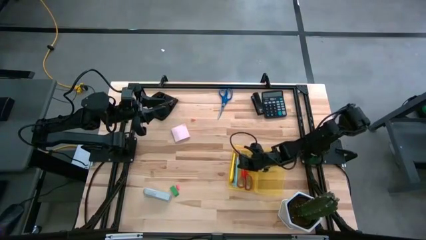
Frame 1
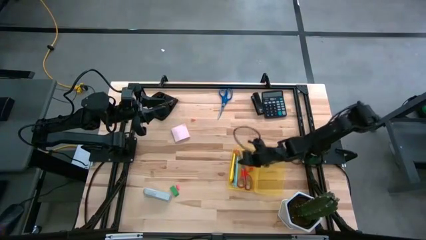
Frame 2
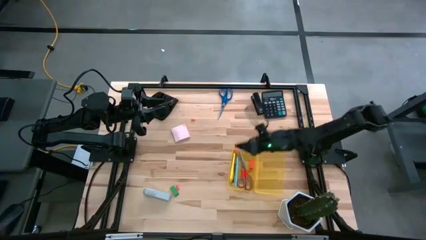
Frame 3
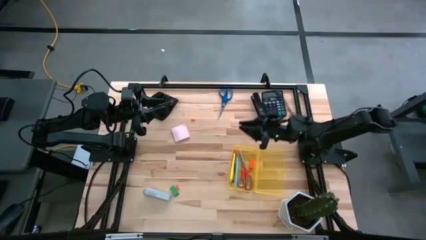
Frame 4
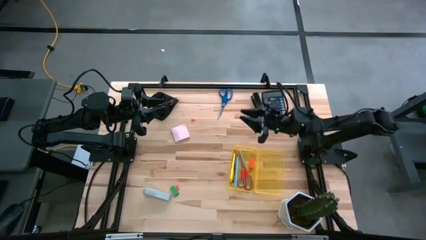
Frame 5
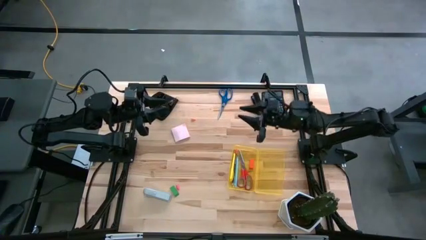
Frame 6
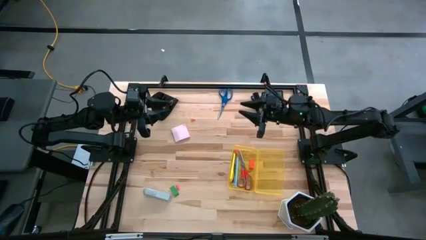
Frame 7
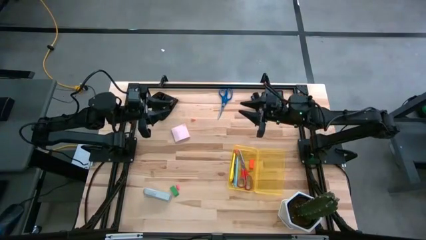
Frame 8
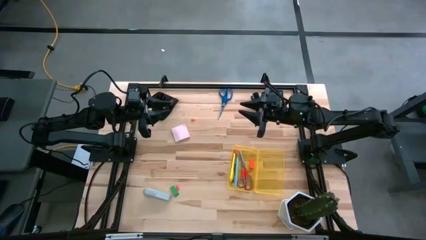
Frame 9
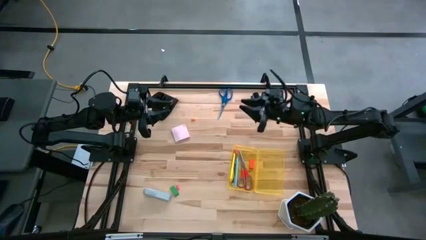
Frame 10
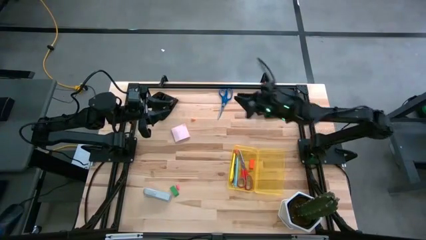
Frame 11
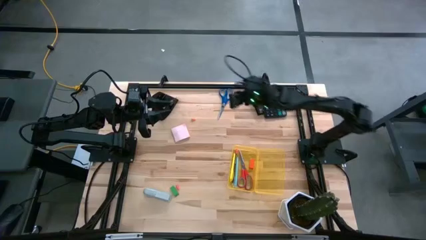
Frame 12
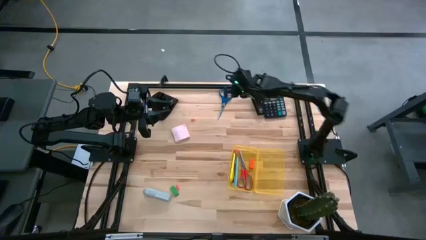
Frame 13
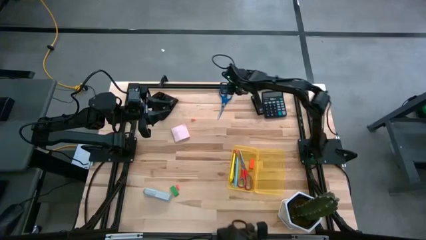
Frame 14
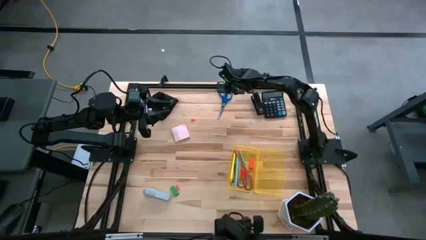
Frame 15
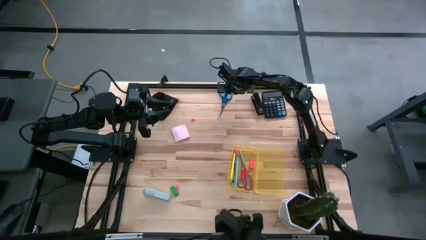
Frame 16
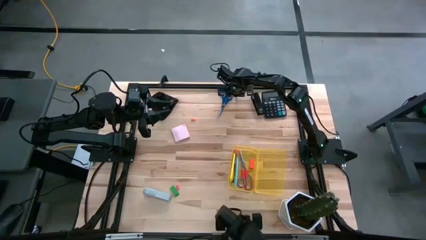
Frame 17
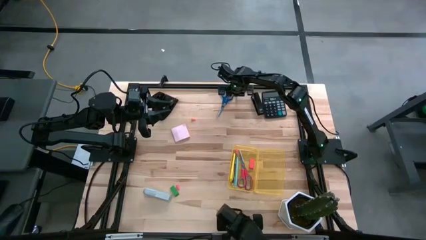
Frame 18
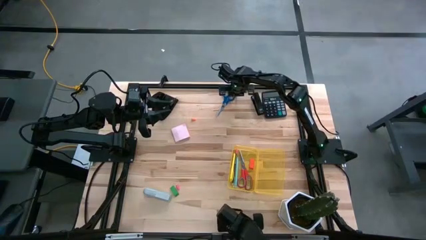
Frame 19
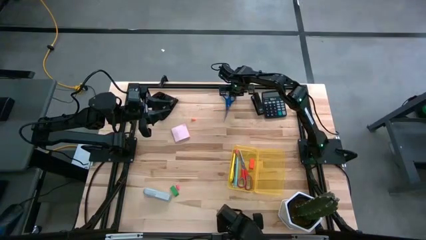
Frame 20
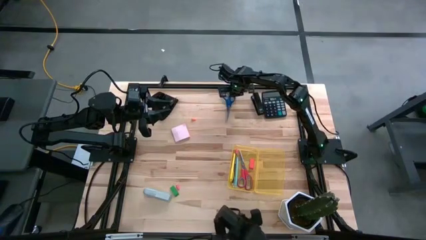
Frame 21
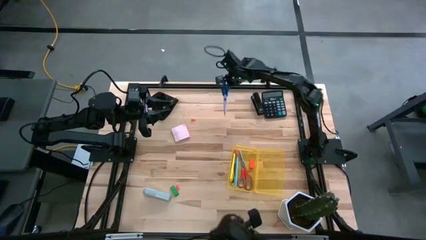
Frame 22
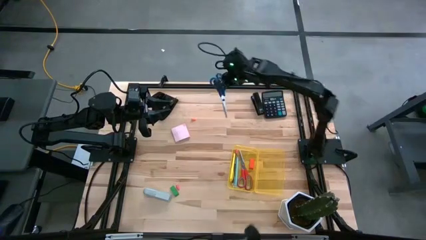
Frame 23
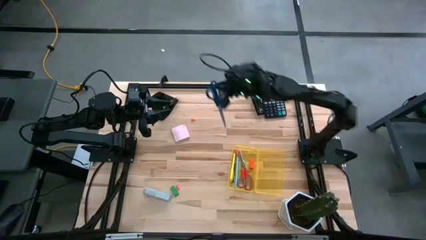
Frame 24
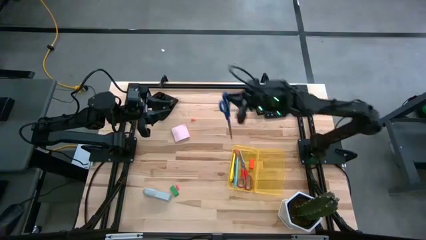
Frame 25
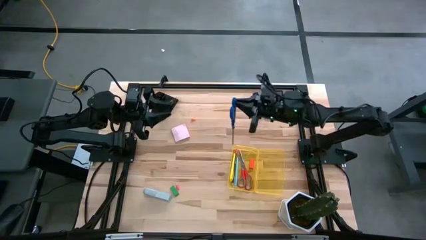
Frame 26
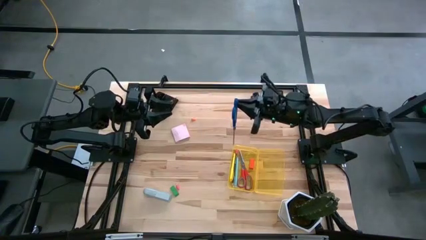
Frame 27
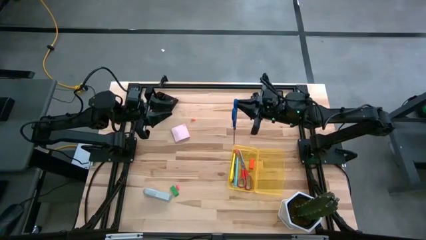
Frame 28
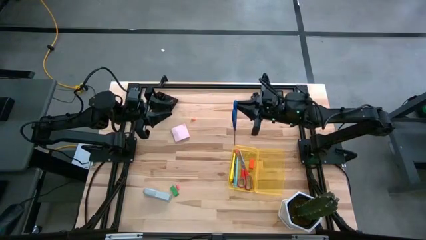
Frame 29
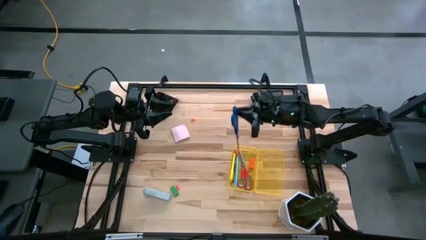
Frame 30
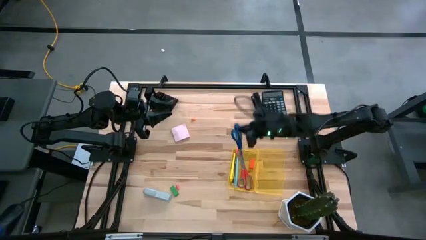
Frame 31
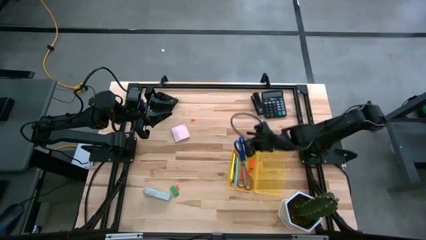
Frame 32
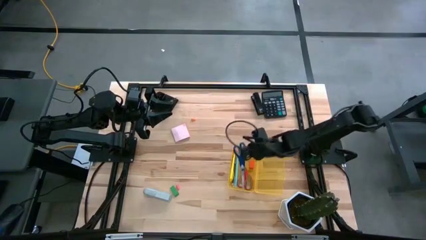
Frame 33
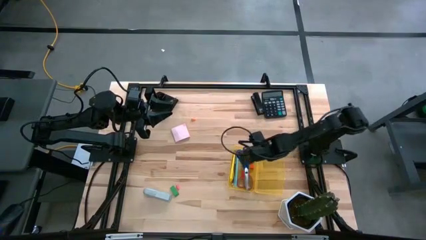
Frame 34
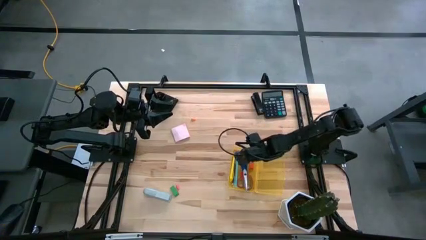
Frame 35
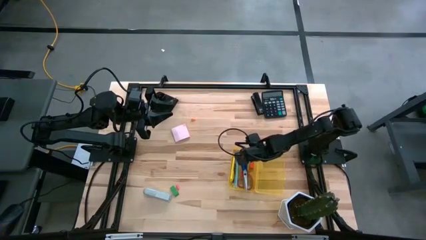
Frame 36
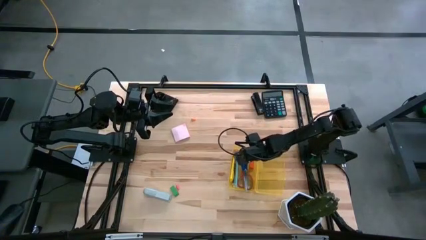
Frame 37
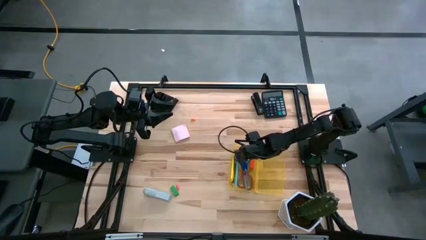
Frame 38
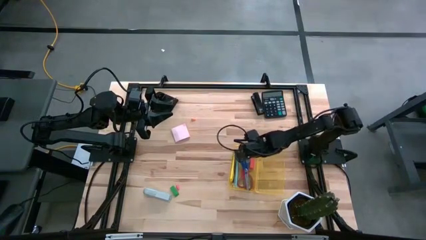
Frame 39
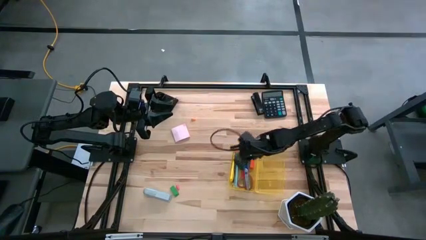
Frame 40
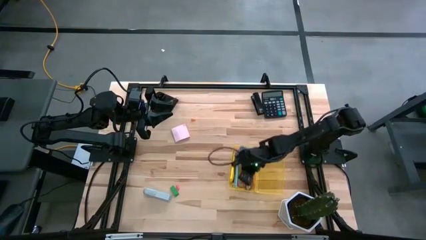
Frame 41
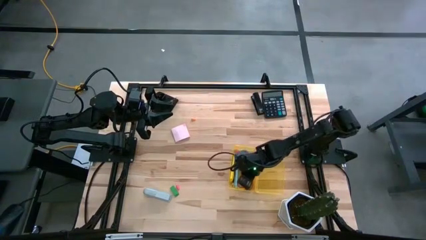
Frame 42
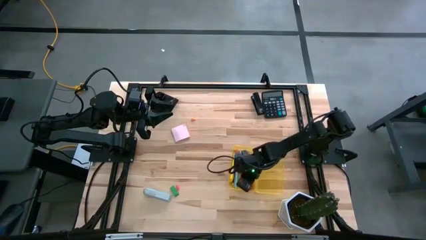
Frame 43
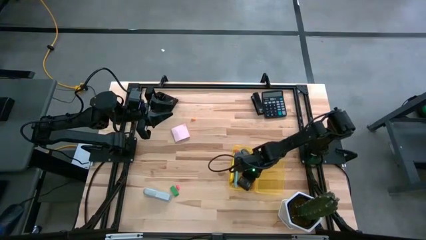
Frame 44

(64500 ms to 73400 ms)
Task: Pack school essentials
Put the blue scissors into the supply box

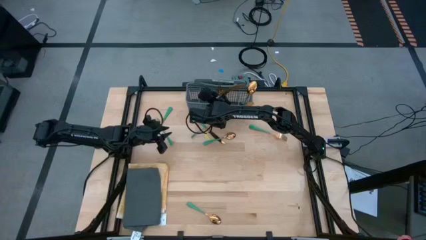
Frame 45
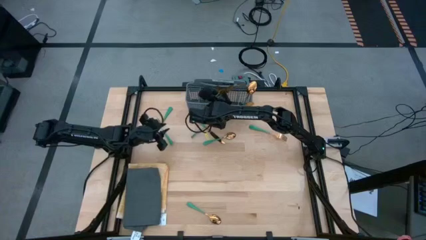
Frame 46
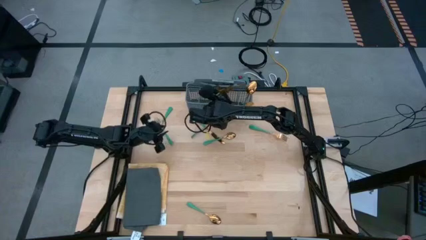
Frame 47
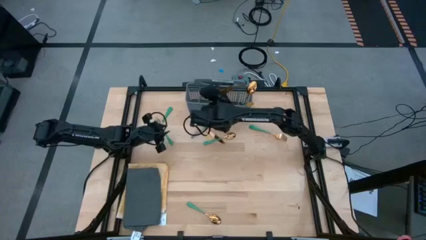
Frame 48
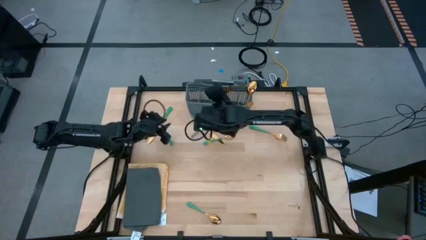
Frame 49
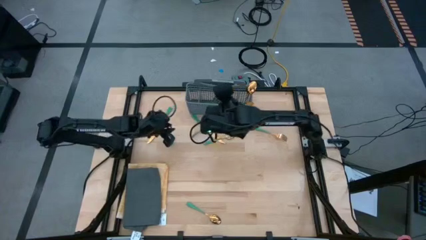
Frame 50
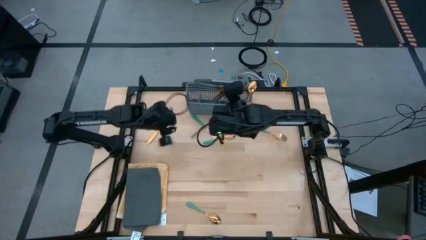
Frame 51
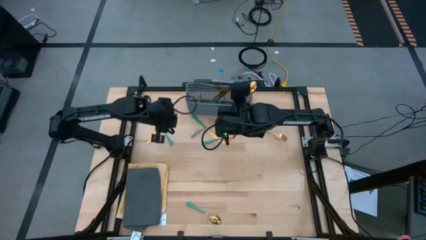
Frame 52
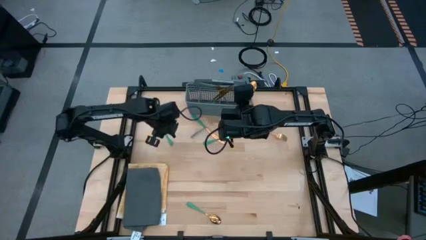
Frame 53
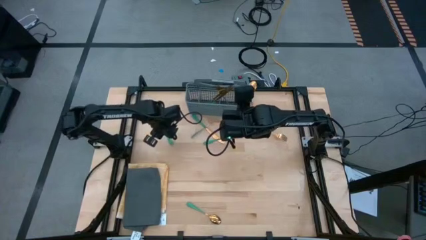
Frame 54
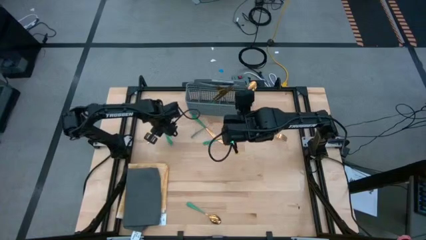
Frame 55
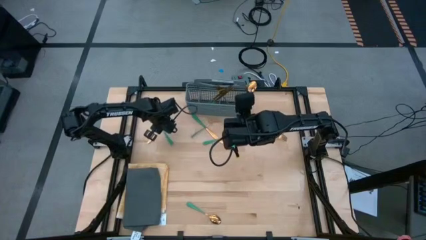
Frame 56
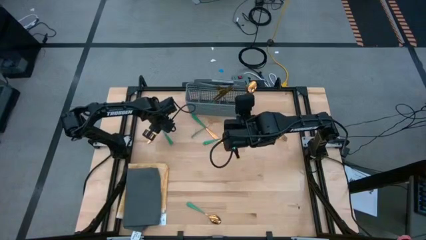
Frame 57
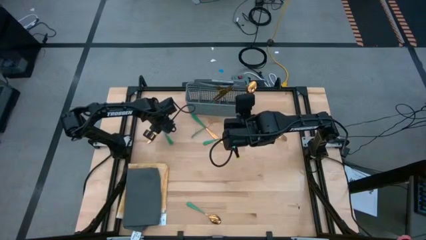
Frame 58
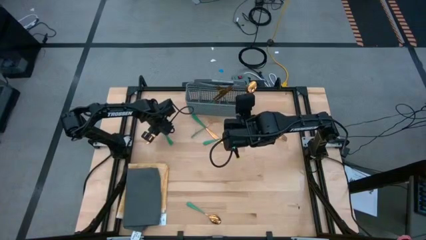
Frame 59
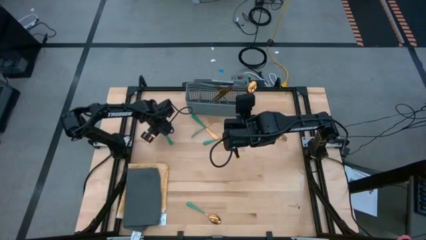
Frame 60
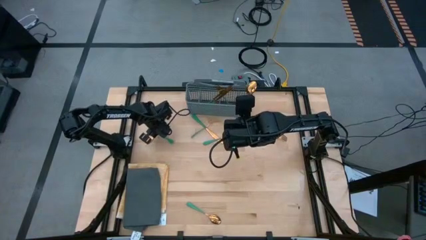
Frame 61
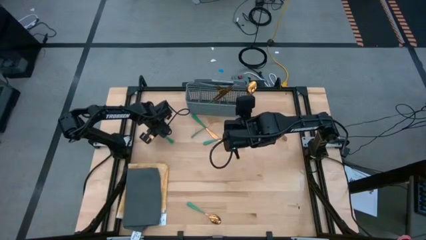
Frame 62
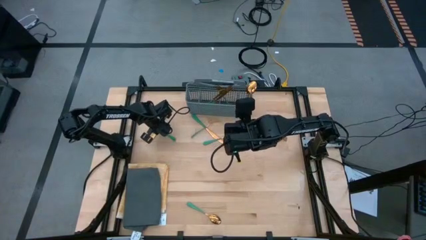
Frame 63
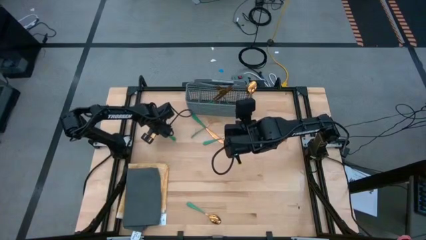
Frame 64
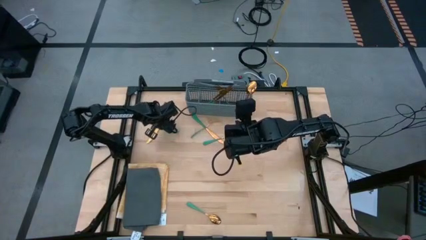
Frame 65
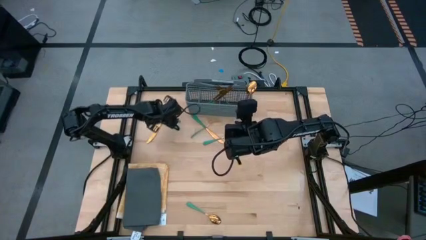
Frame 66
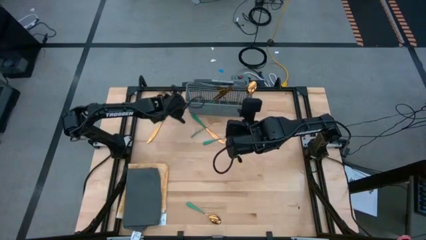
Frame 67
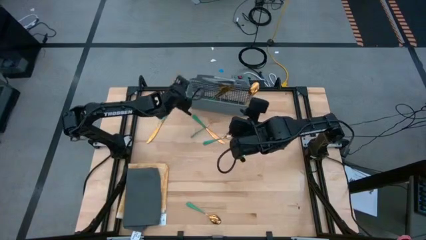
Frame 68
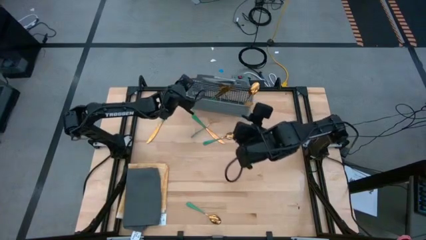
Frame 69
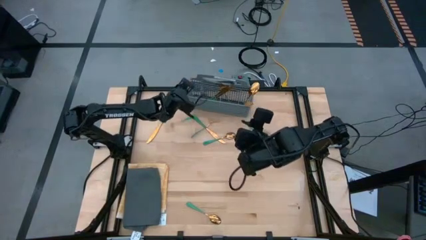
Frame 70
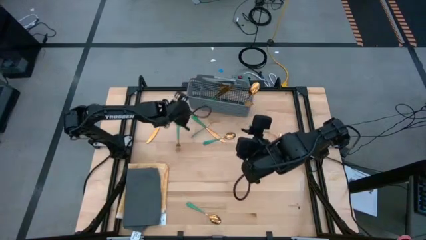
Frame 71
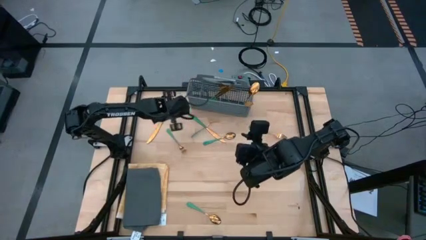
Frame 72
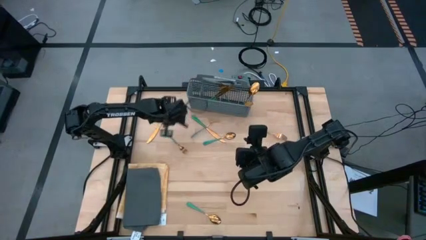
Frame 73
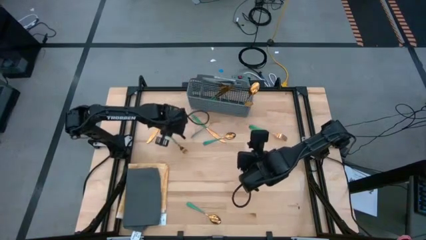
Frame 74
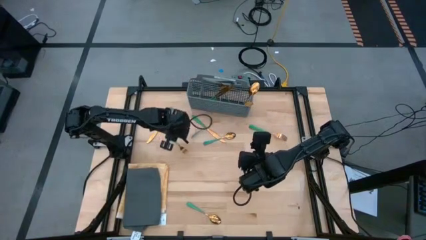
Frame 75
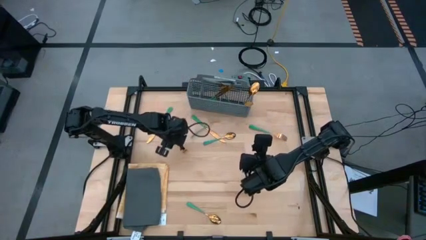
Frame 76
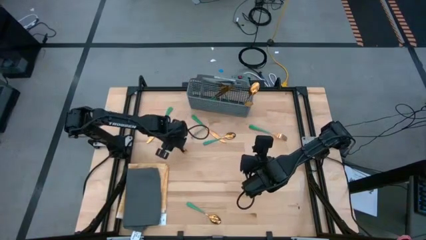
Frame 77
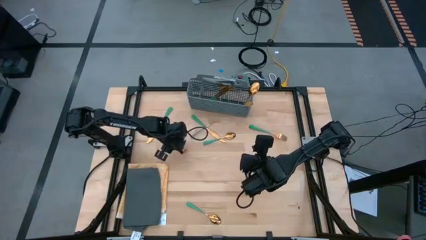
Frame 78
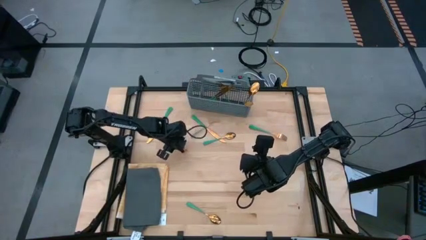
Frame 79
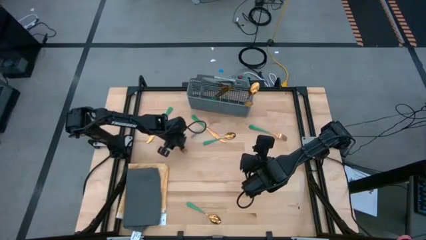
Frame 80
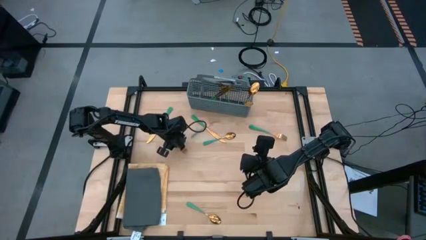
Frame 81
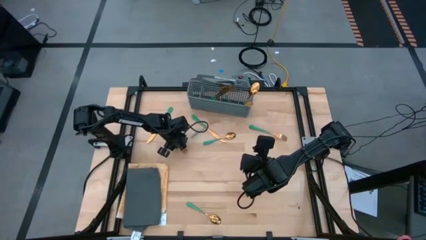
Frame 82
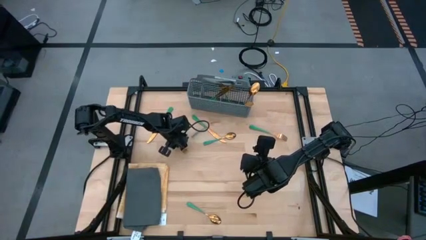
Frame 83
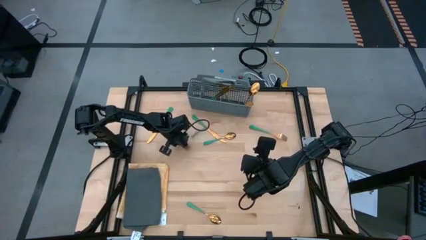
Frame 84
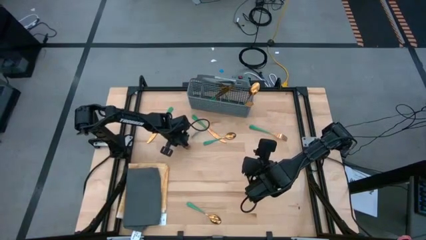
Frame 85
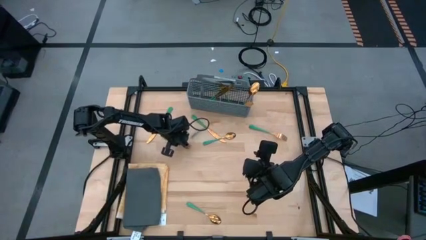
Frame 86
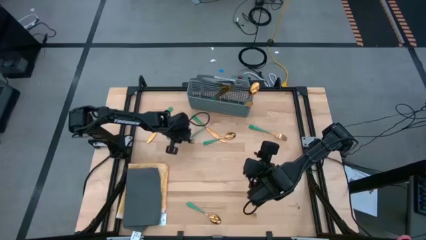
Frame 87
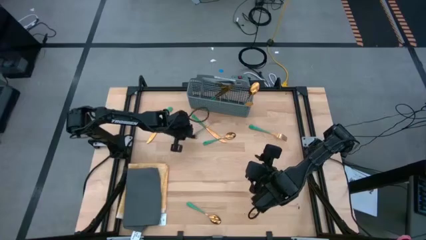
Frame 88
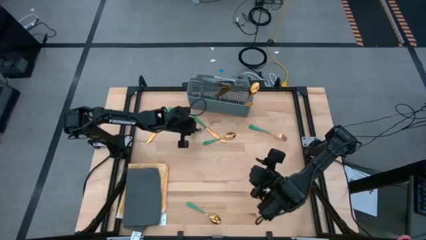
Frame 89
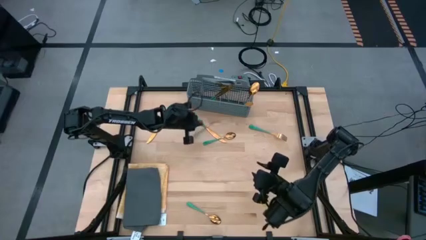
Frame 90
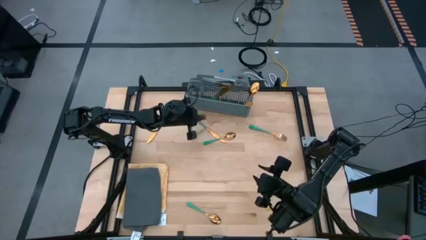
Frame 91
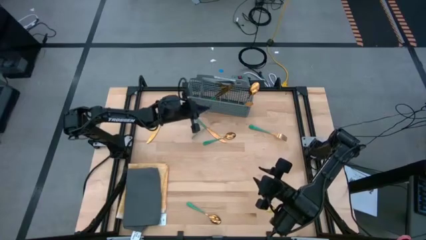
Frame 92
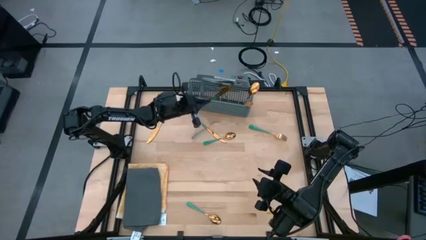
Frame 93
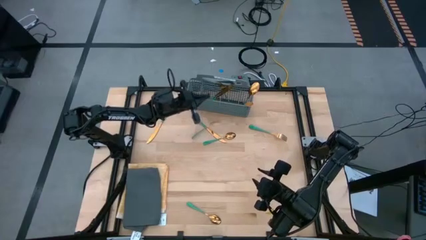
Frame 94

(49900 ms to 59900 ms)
Task: Sort silverware
Put the green fork into the dishwasher utensil holder
